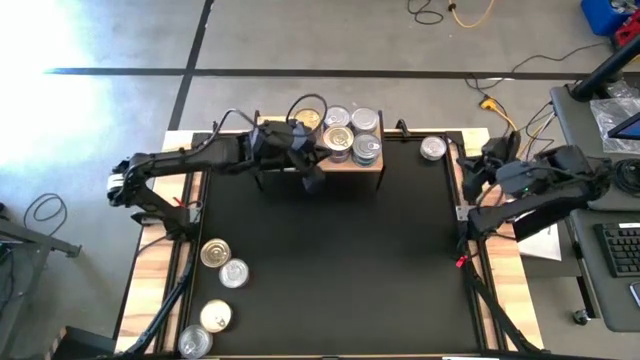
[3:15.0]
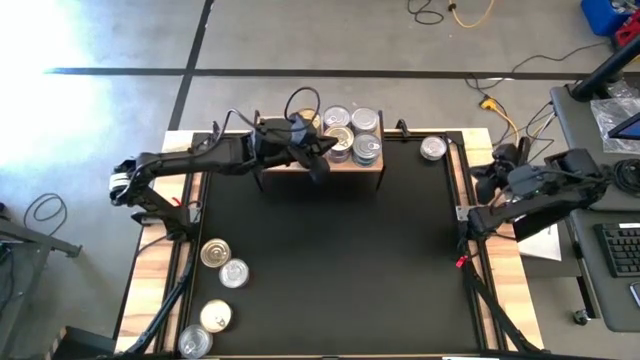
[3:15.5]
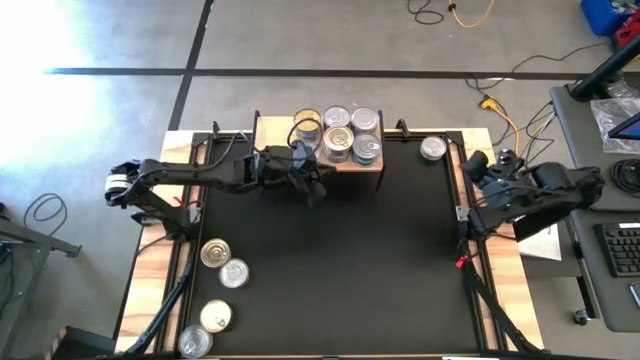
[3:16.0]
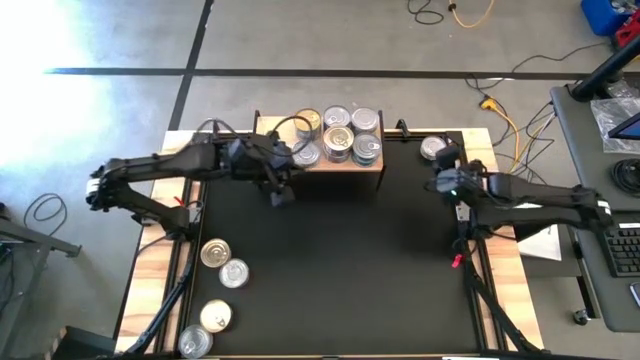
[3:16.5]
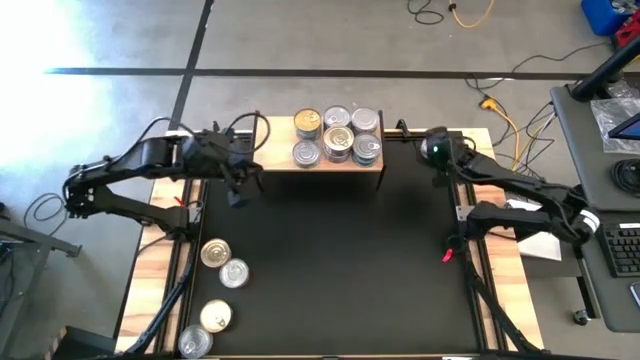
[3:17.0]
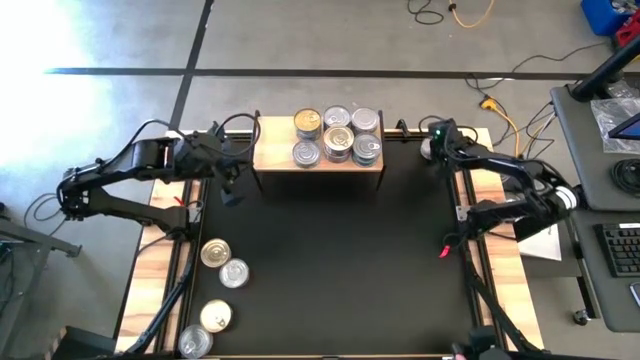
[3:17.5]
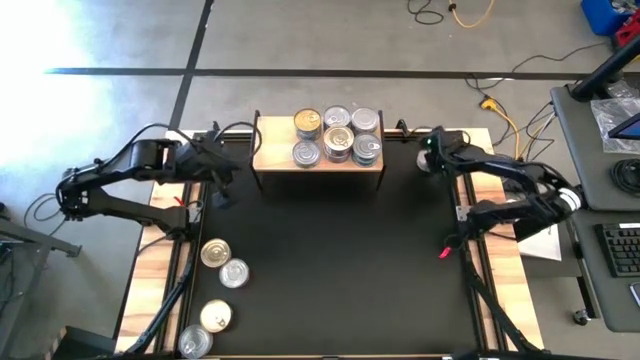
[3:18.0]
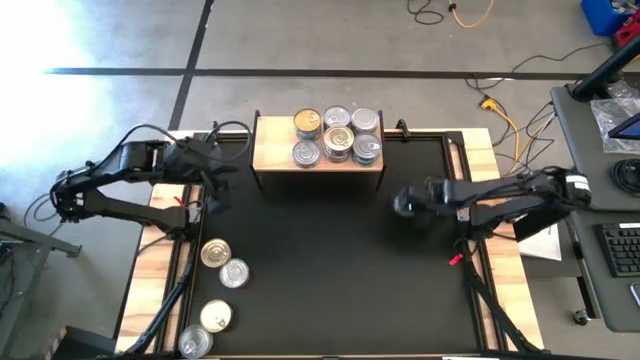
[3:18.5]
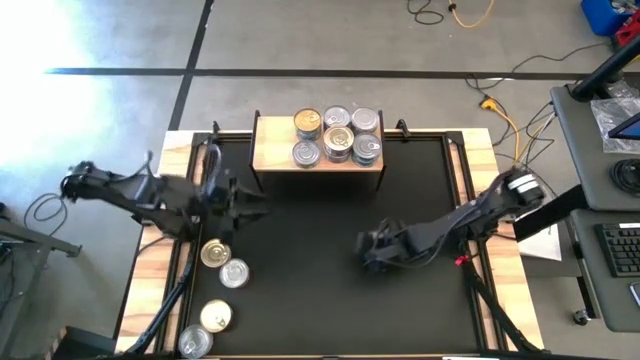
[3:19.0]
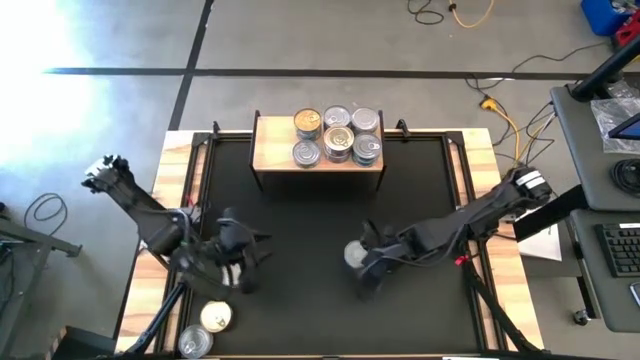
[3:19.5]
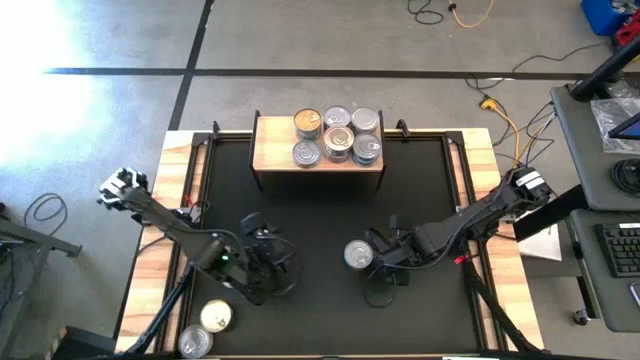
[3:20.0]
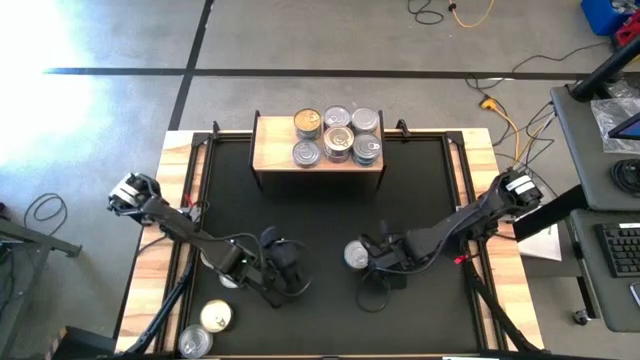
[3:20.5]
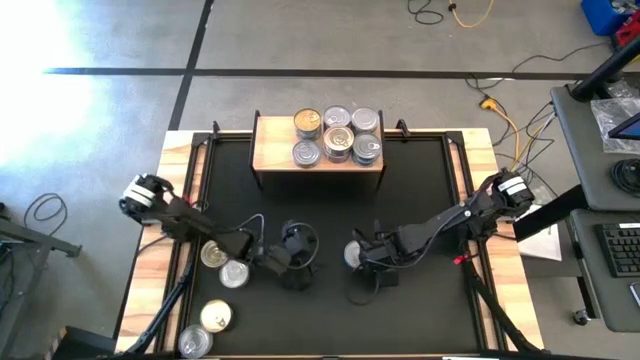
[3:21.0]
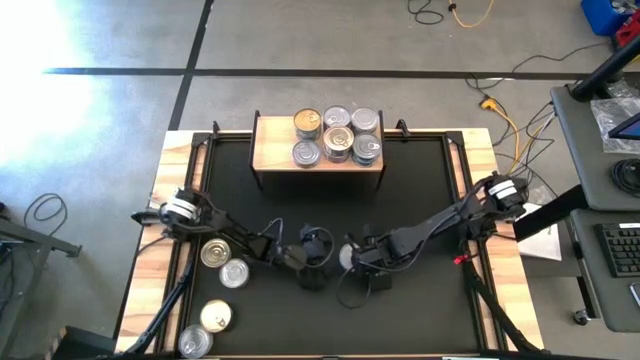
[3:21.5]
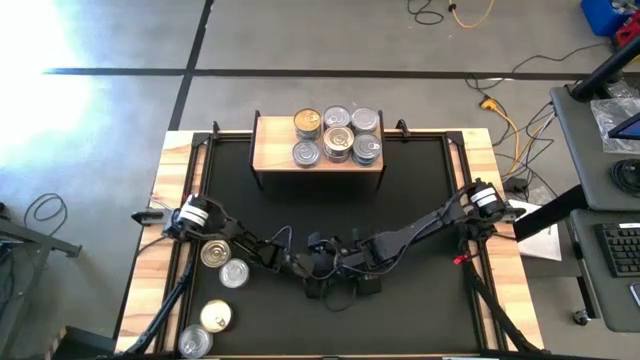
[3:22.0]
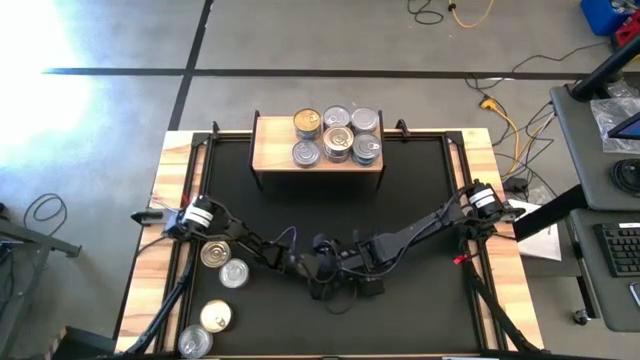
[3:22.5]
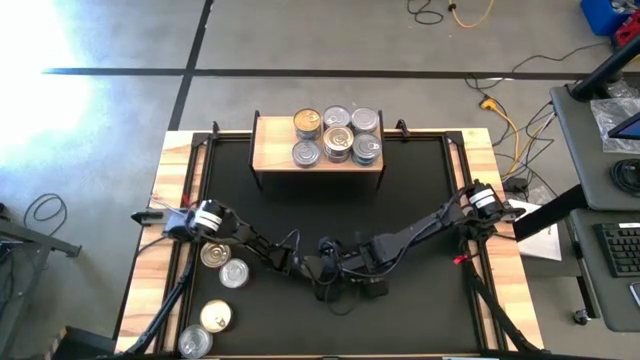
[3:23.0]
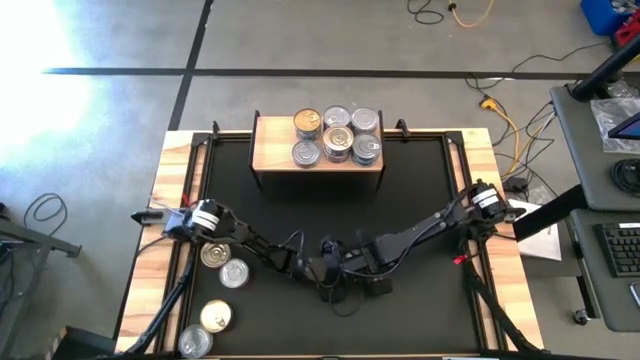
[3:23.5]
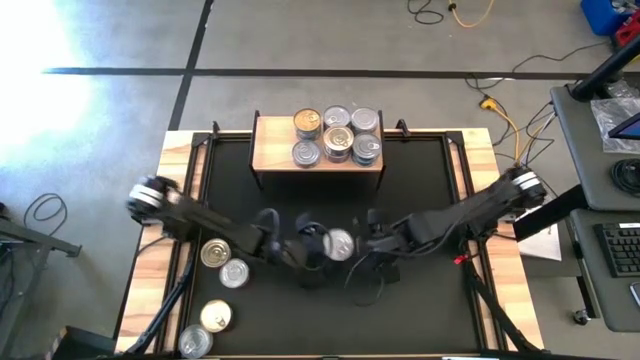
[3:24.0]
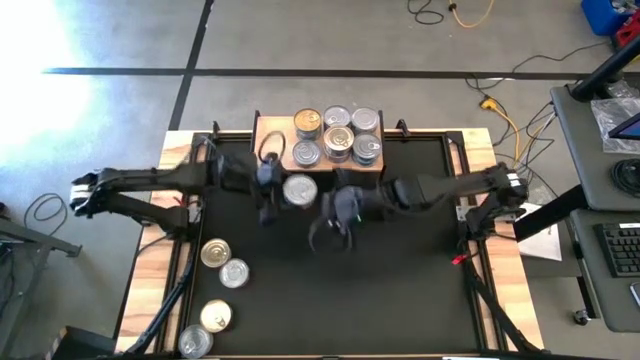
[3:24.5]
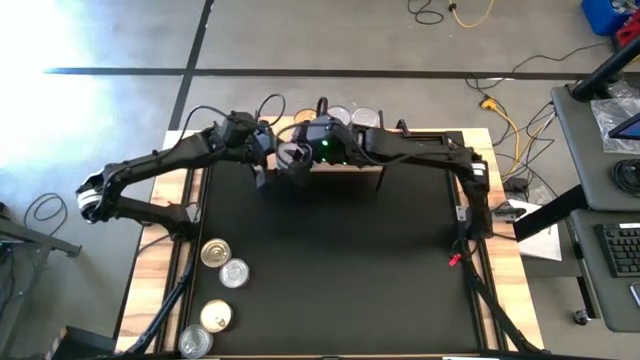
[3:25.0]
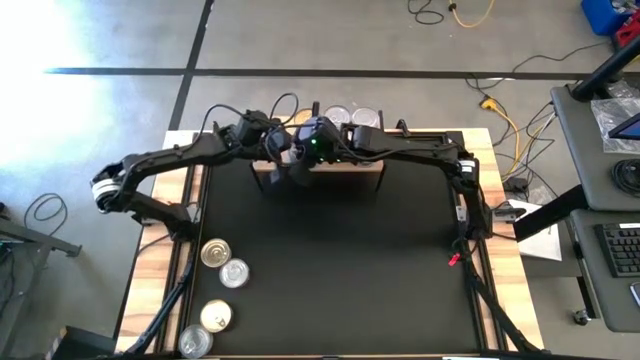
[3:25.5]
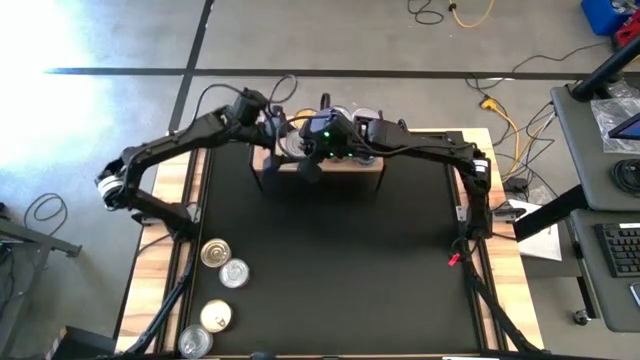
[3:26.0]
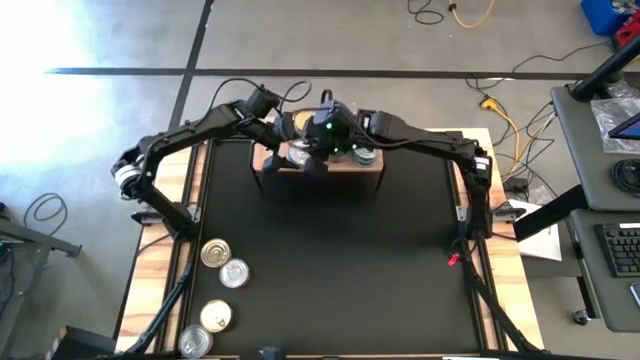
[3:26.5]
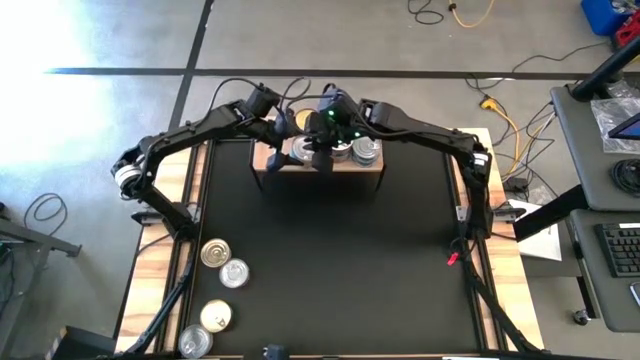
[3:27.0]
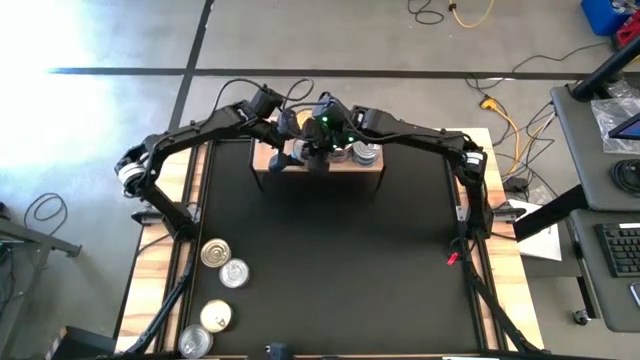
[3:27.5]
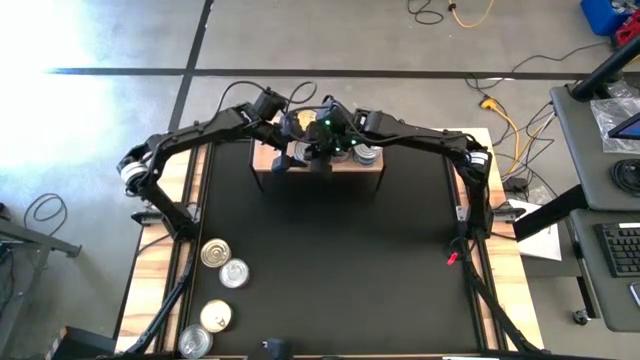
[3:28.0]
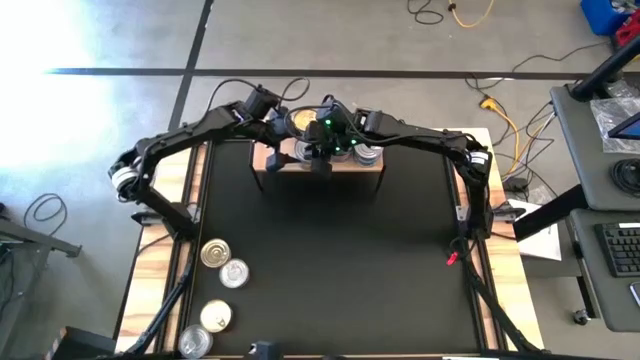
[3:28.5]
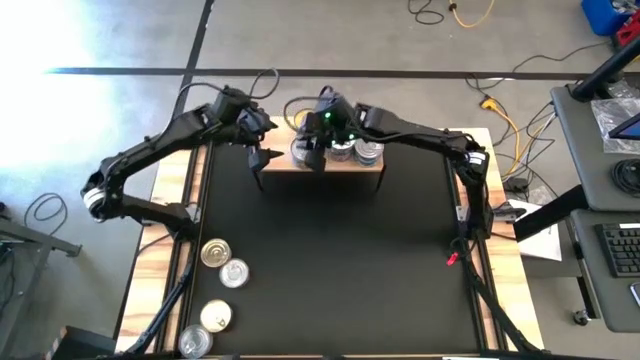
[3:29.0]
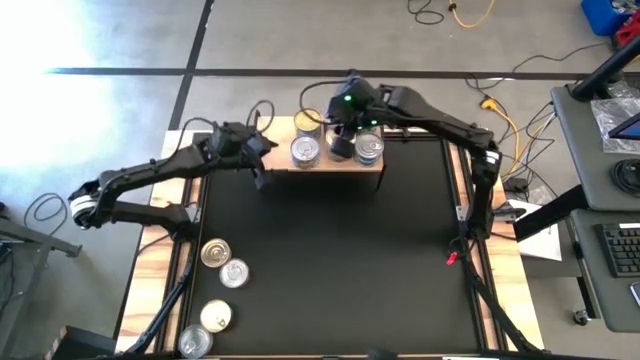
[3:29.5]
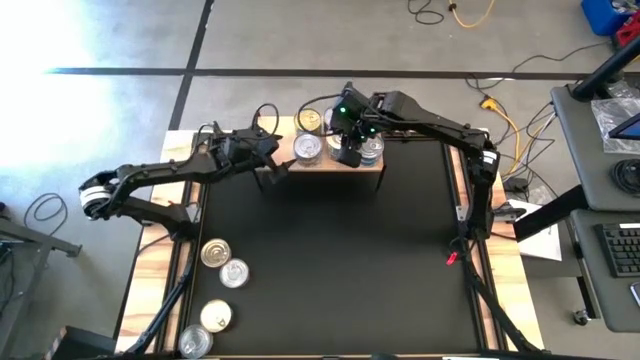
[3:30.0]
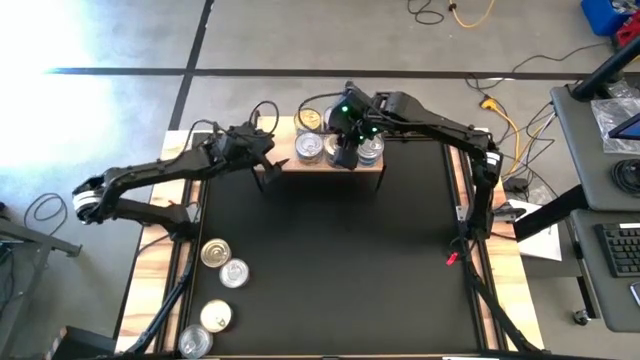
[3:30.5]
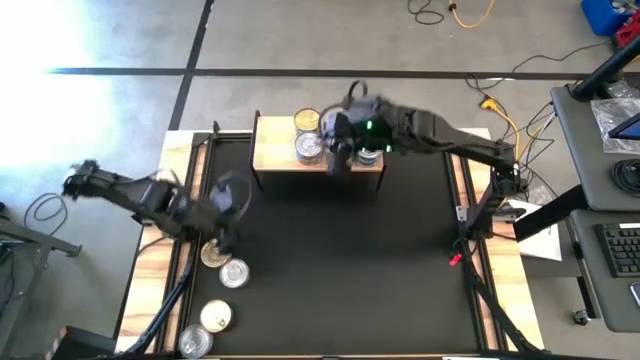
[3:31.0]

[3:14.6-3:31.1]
Task: Stack canned seafood by type on shelf
Stack the yellow tuna can on top of the yellow tuna can on the shelf

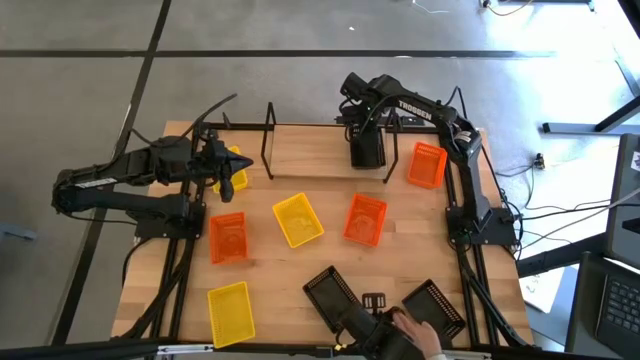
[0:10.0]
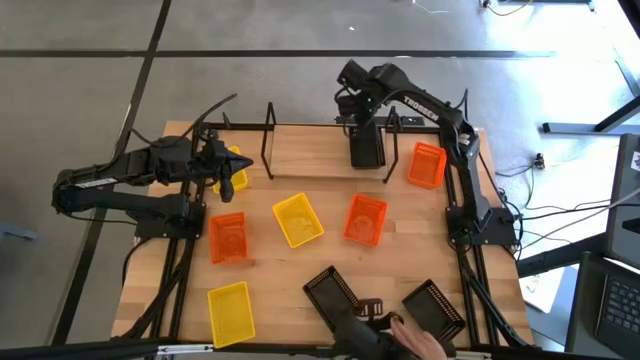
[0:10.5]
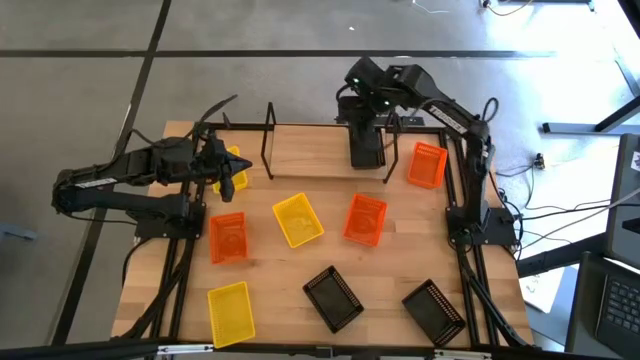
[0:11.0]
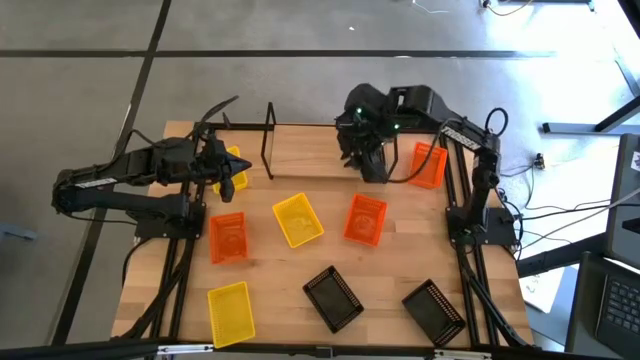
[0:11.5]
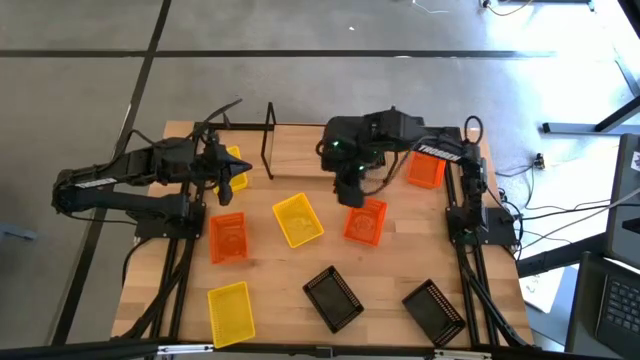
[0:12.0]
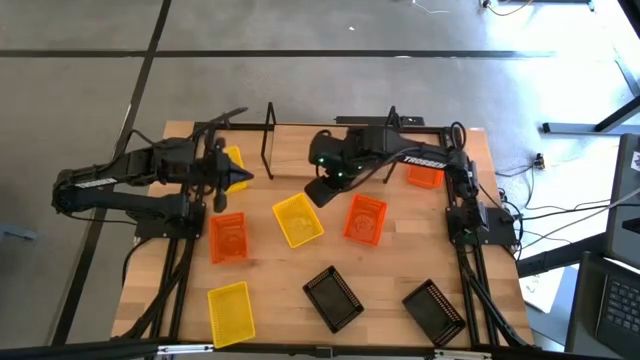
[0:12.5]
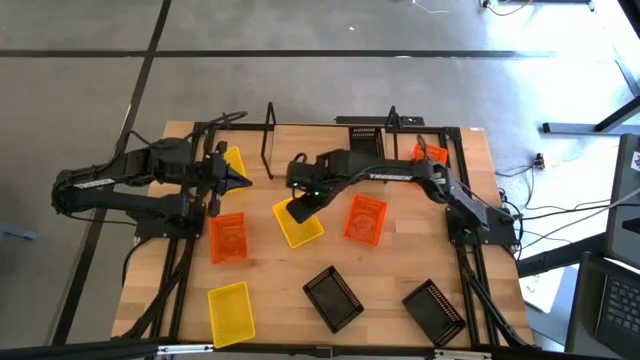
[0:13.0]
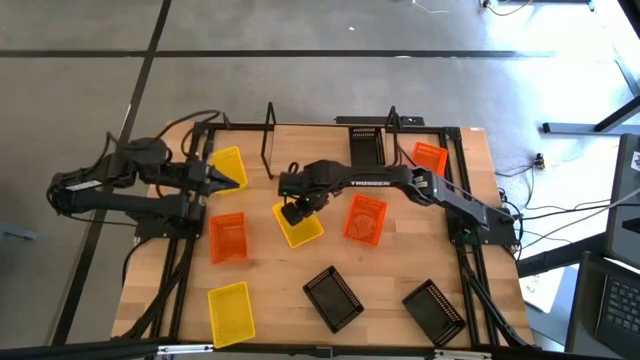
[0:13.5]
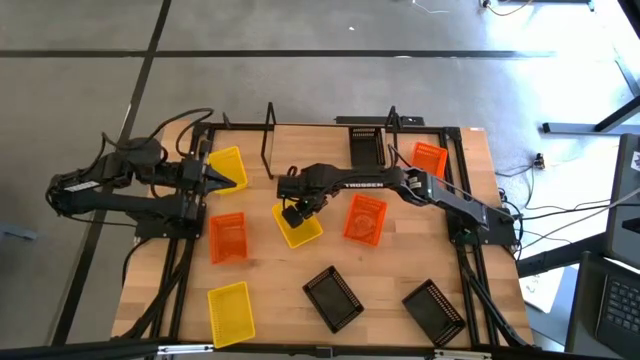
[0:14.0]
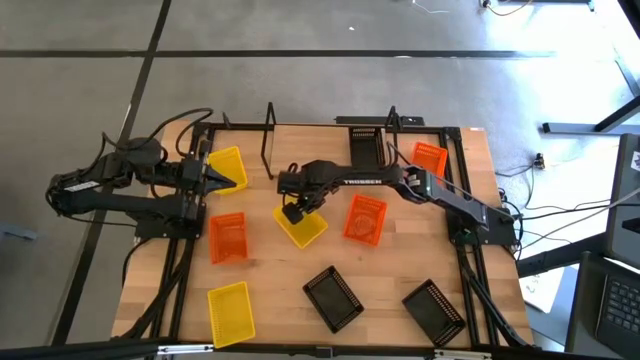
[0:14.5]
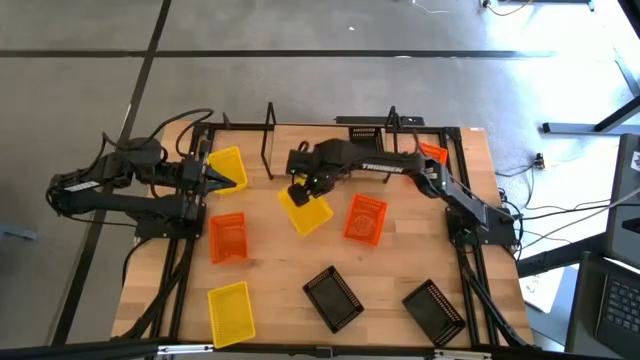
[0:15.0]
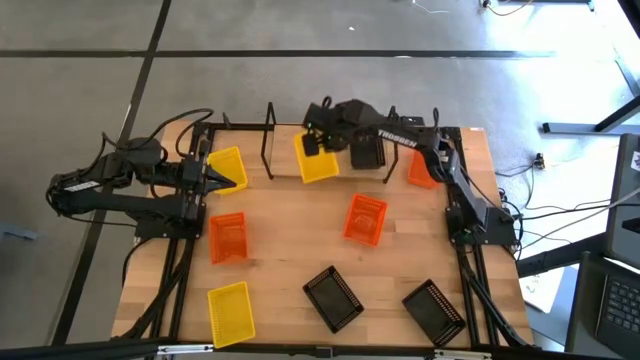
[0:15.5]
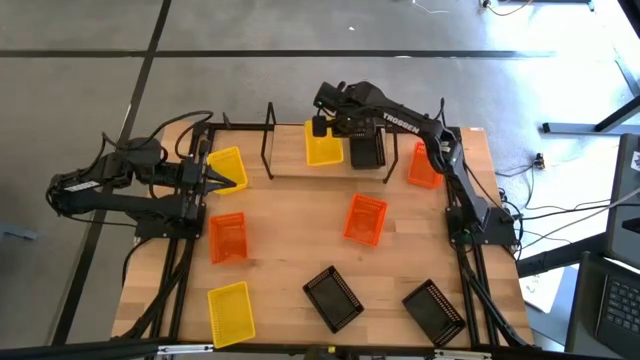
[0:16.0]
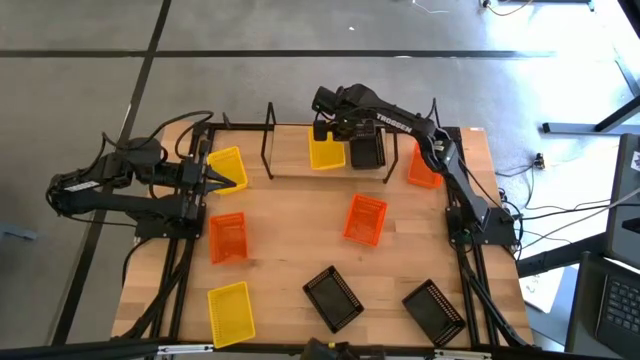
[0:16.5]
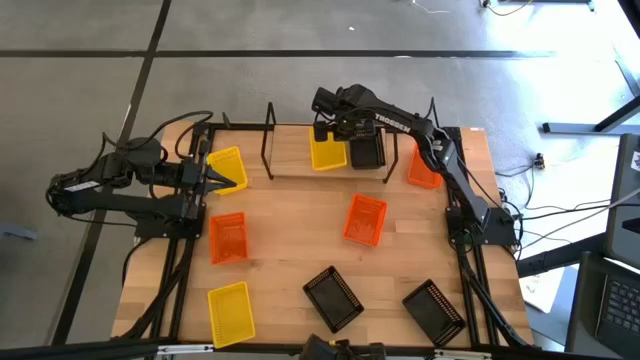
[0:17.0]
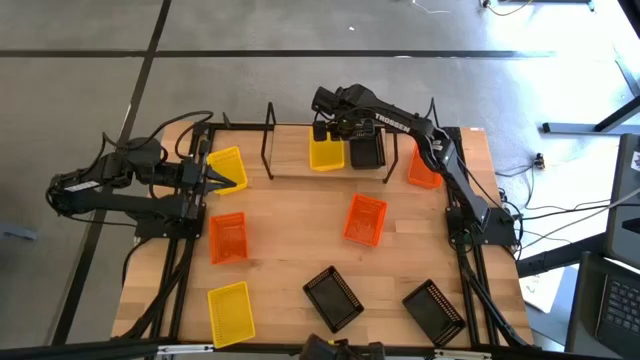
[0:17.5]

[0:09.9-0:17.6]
Task: Stack baskets on shelf by color
Put the middle yellow bin on the shelf
